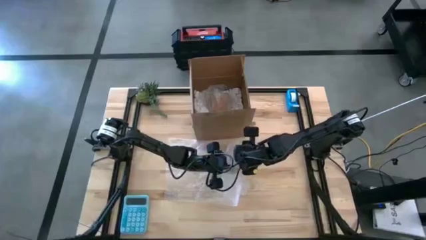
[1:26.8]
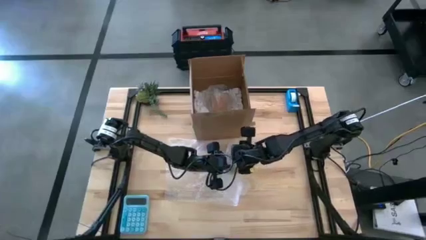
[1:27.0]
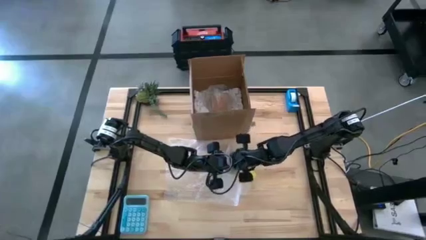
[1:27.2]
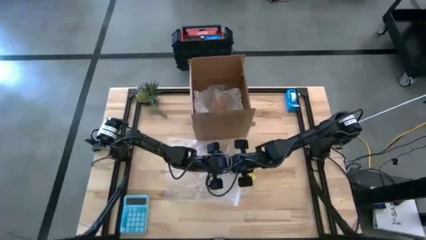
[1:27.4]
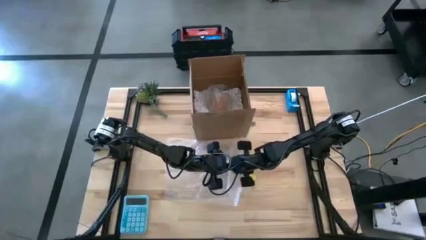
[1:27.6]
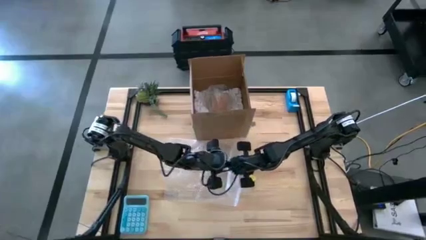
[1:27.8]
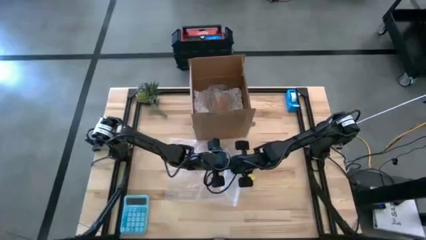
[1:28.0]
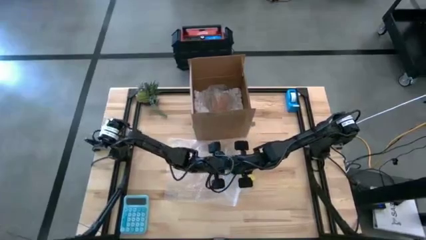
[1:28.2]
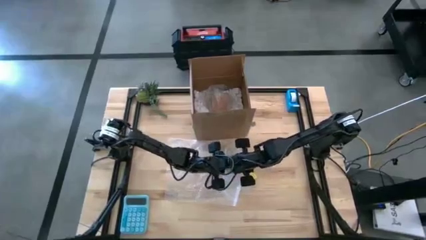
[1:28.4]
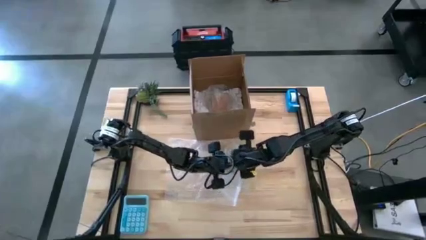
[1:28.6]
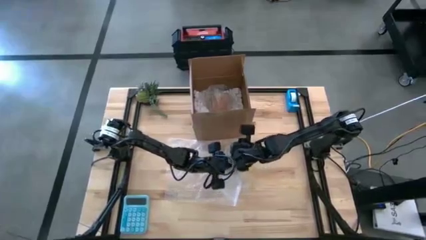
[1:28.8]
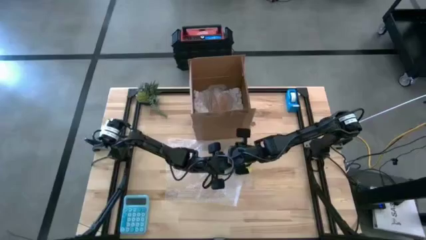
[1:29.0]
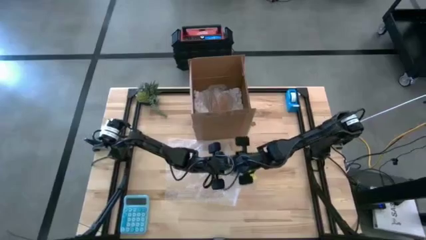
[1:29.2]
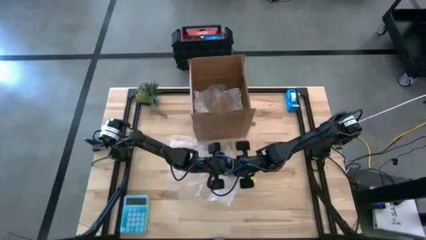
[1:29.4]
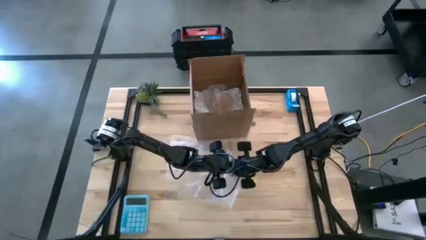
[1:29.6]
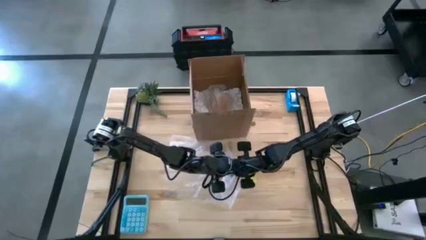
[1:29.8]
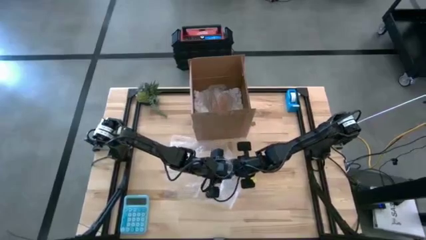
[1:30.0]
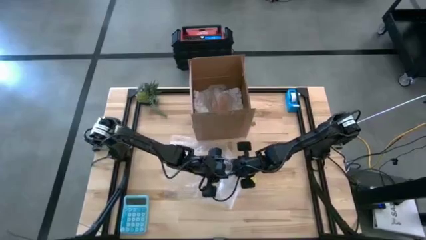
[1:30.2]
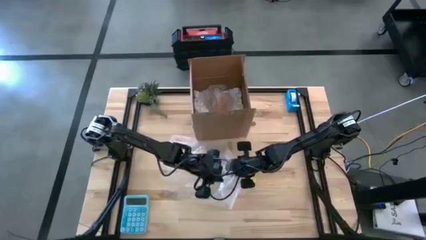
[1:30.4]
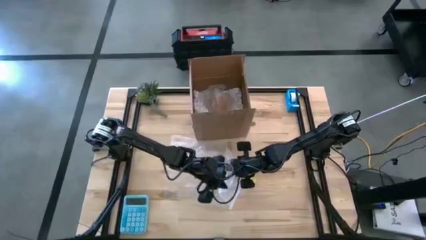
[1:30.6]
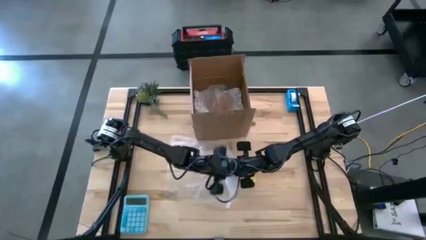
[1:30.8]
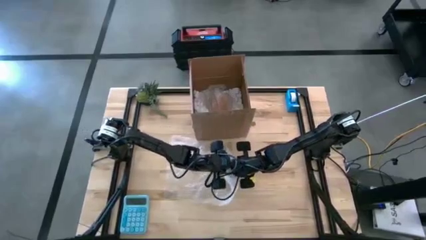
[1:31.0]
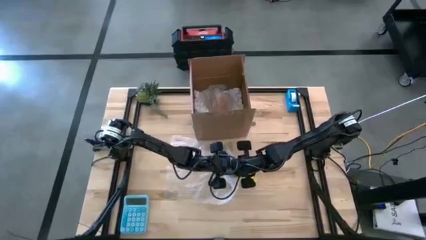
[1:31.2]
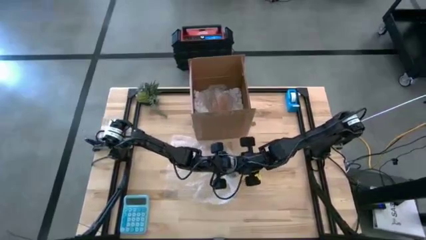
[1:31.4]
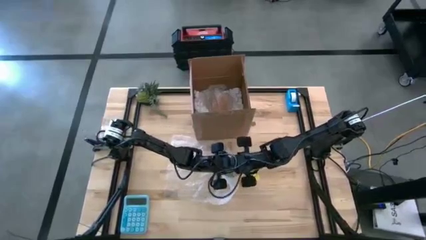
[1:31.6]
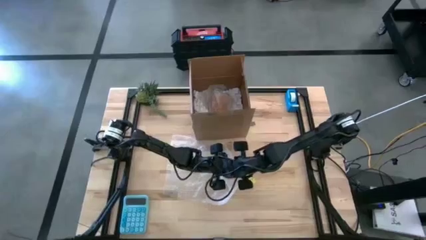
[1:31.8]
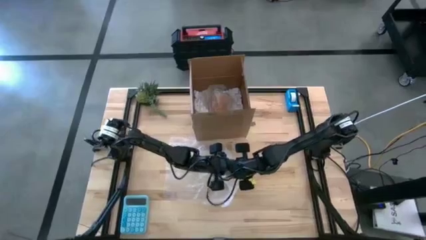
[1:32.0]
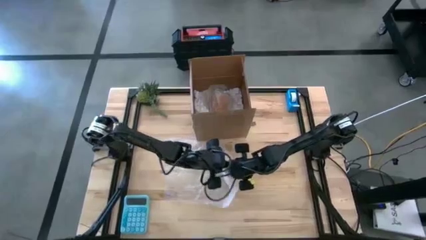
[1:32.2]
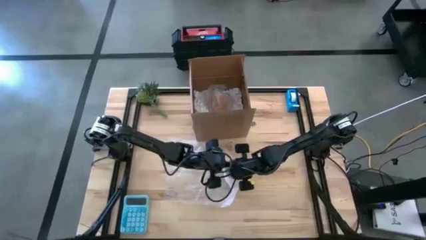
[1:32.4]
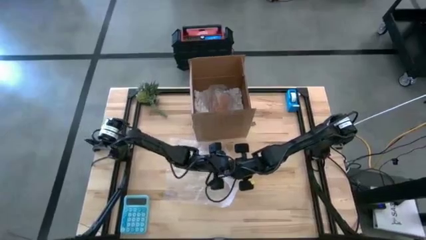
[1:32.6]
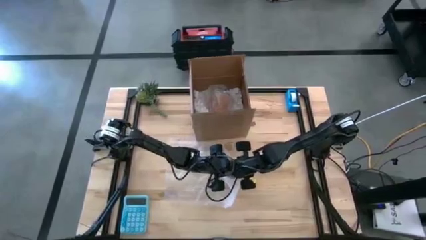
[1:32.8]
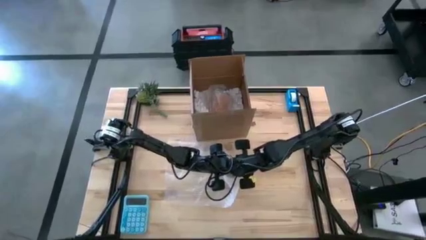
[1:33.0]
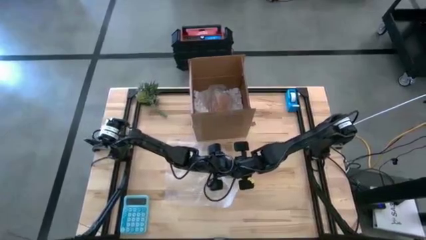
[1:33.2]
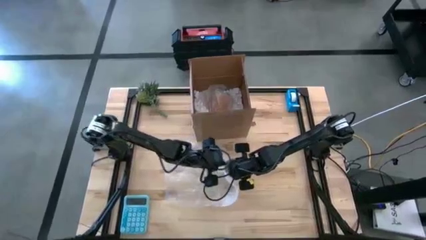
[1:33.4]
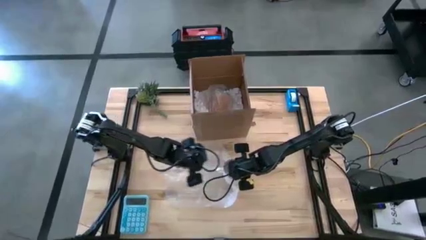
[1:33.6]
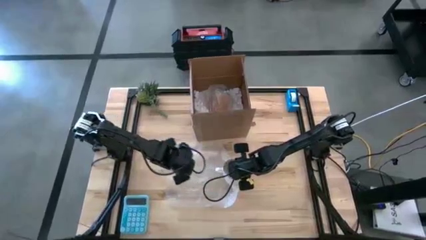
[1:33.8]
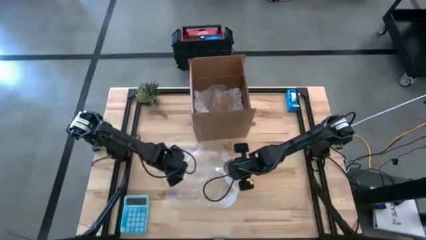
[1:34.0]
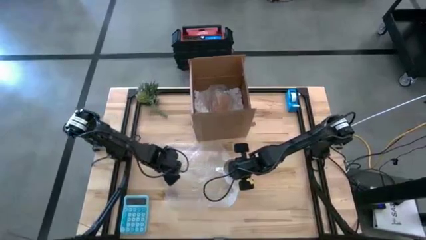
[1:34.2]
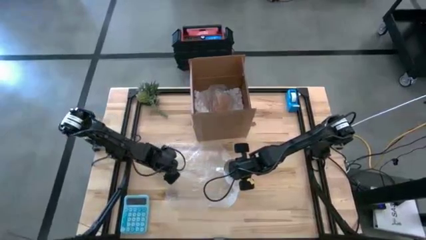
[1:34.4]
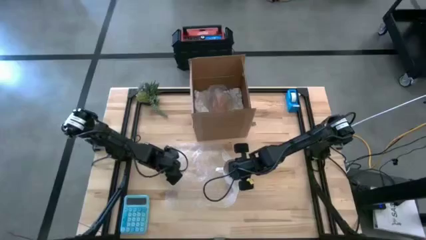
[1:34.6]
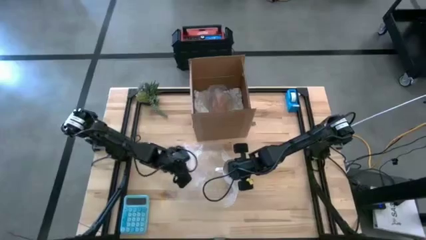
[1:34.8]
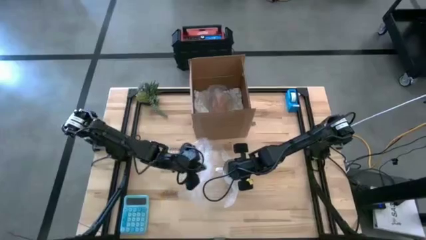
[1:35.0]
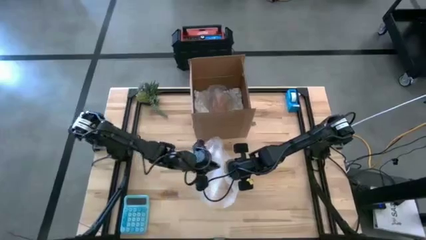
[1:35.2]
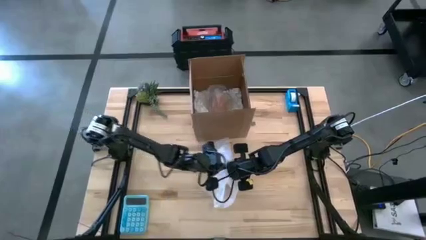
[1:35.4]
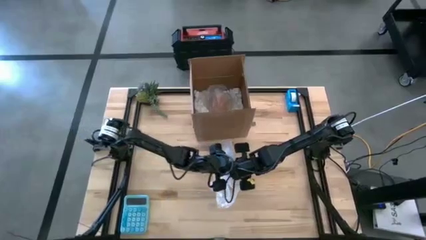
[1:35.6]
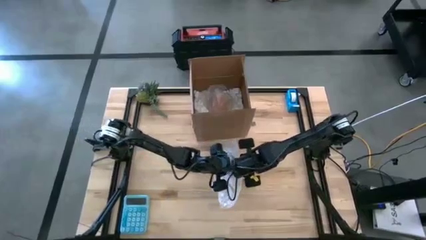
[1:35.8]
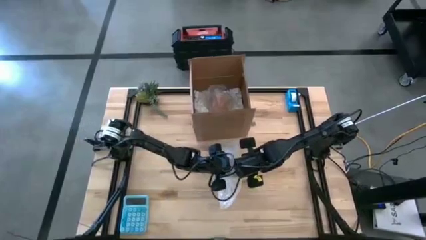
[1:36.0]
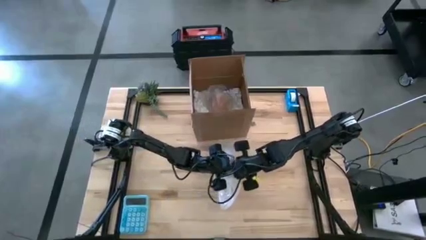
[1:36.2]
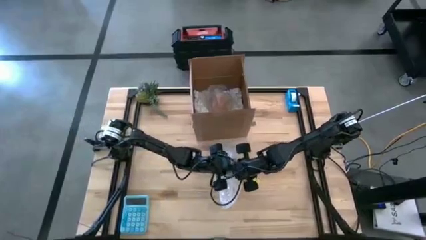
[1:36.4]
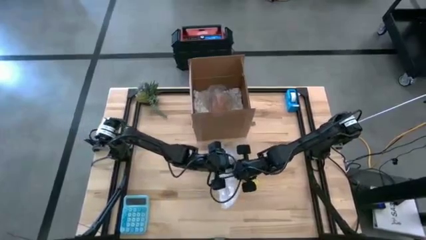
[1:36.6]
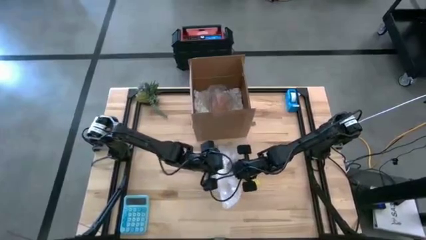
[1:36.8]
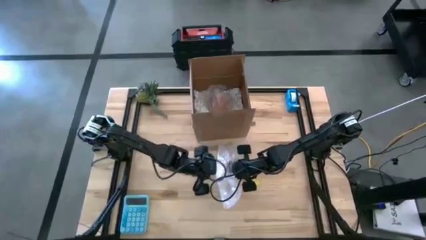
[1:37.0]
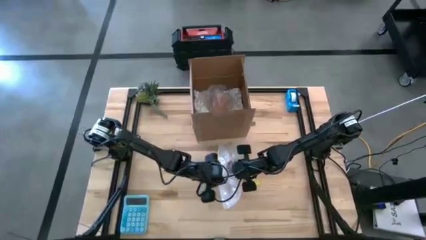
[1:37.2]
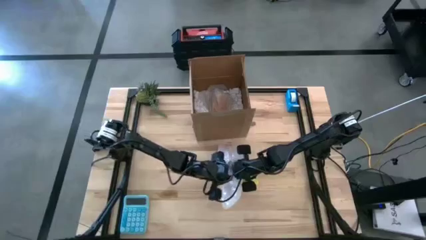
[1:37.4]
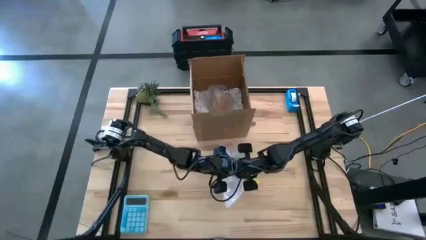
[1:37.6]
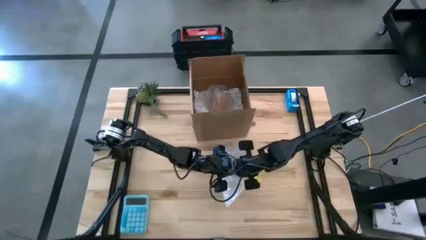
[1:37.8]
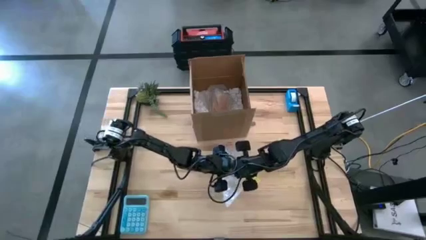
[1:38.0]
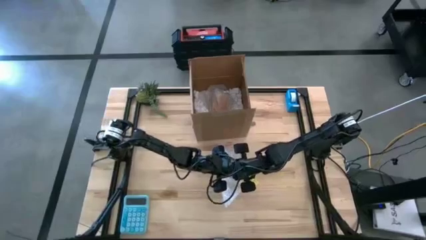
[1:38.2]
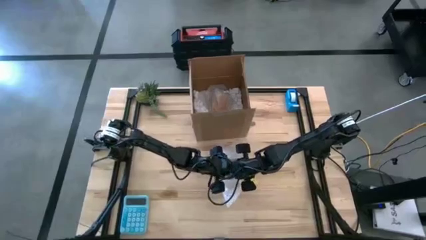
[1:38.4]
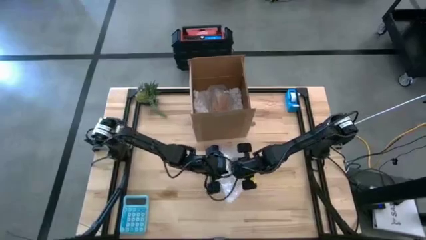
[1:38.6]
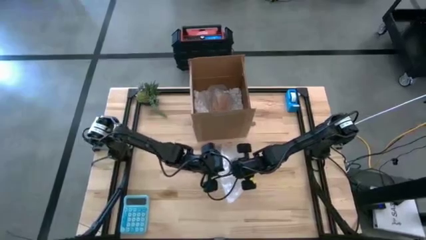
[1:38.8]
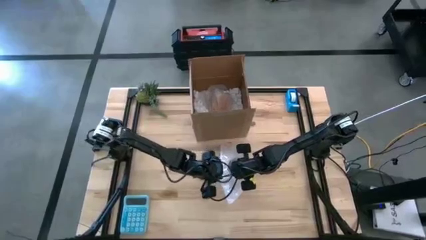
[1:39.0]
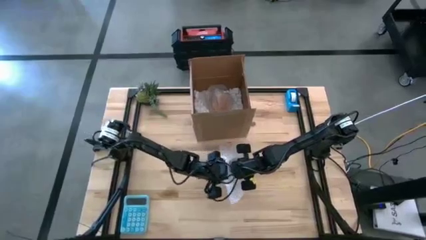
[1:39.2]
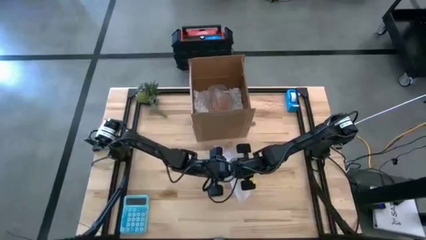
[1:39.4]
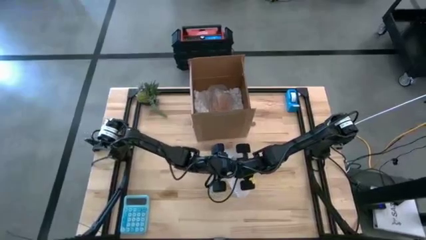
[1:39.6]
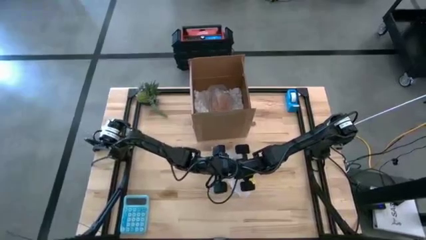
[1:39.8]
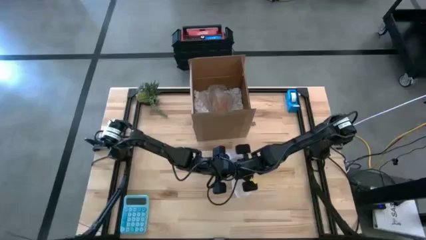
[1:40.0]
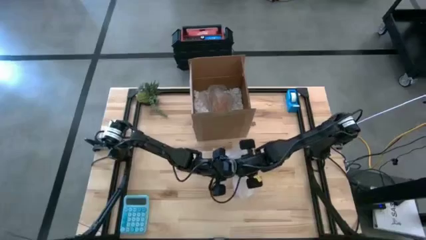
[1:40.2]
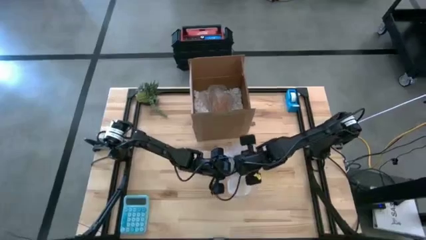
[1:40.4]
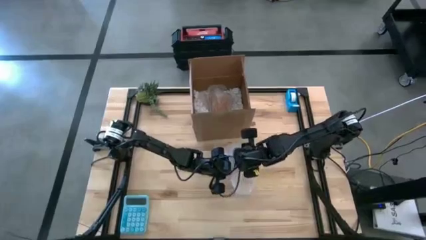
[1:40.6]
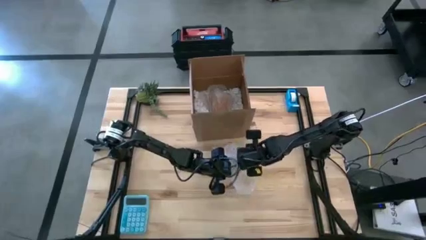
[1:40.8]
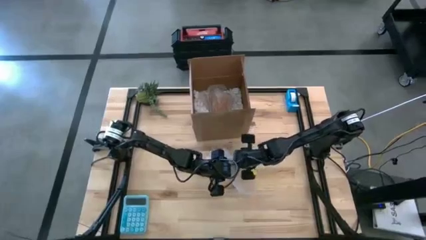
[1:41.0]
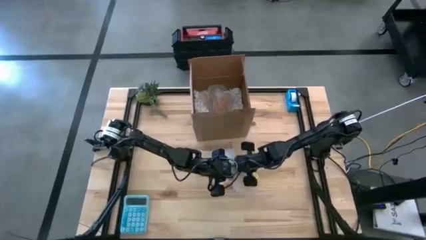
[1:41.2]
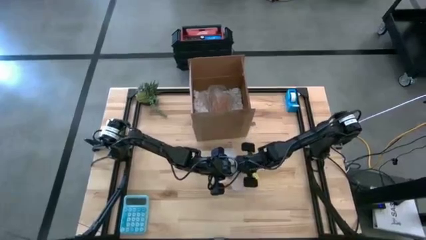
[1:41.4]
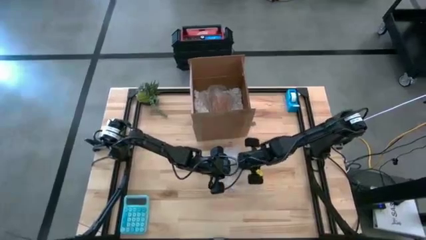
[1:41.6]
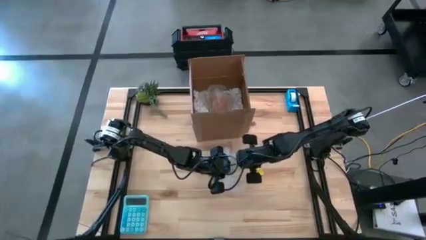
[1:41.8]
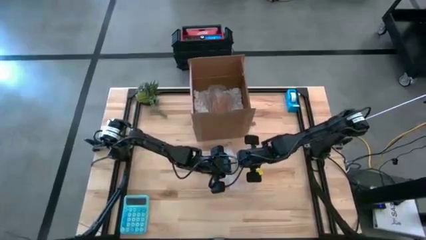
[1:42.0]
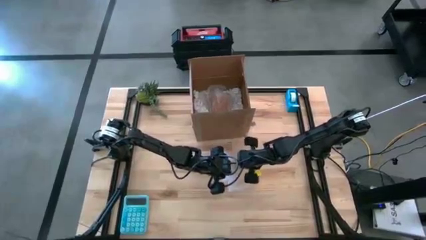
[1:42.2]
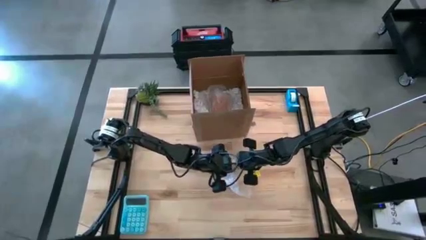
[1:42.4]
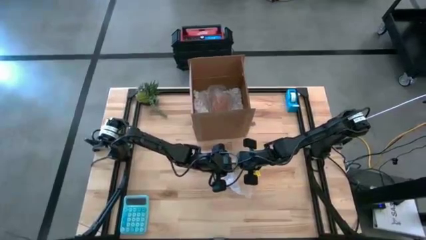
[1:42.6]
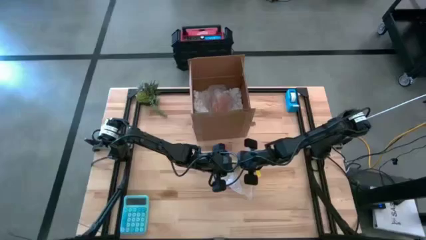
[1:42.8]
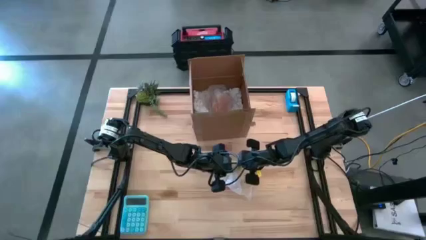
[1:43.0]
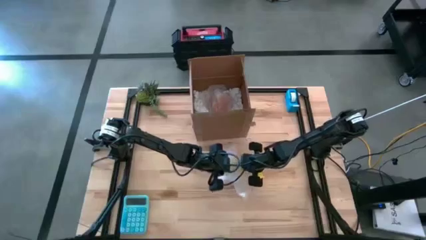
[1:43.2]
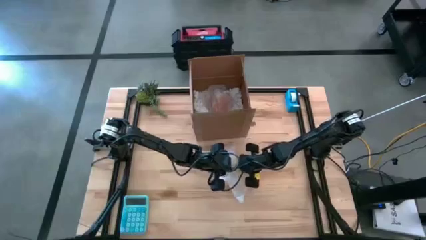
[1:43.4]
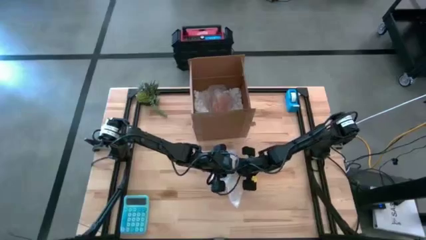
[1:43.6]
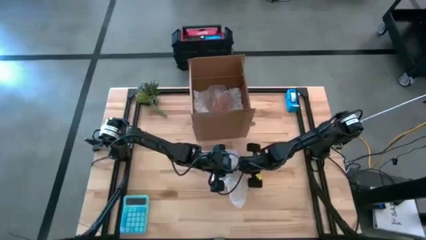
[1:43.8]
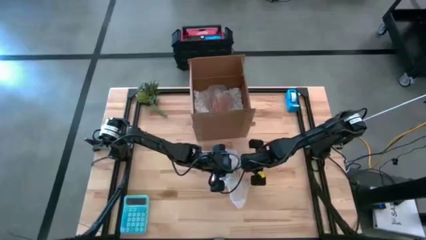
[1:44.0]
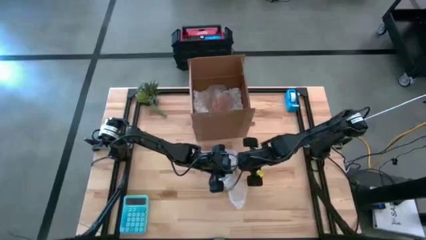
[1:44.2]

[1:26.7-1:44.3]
Task: wrap mug
Wrap the yellow mug with bubble wrap
